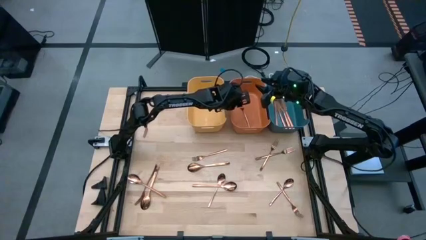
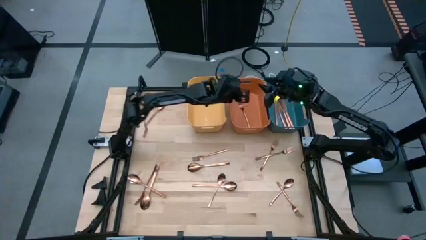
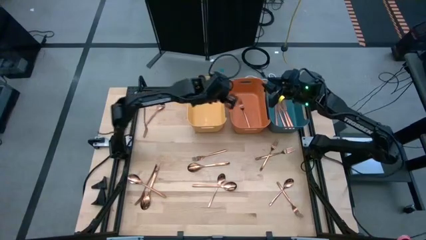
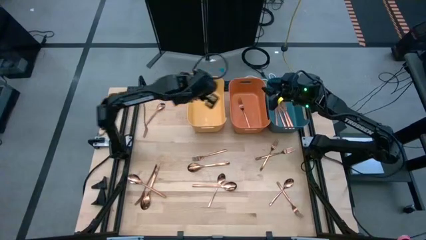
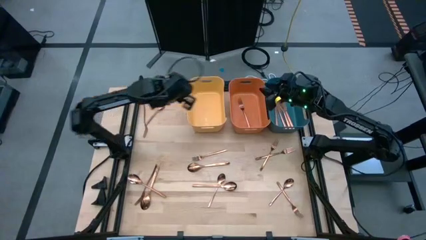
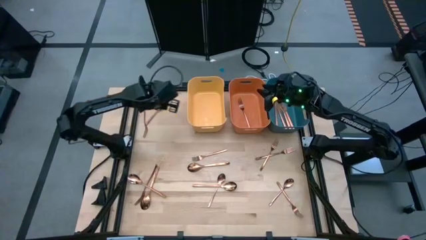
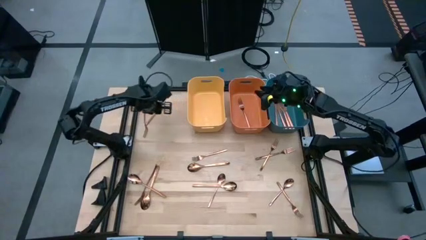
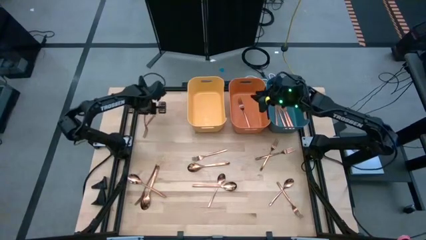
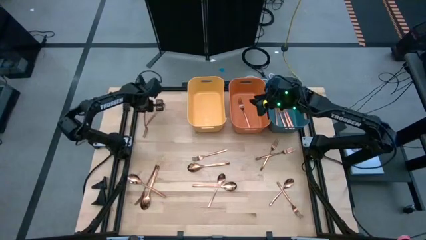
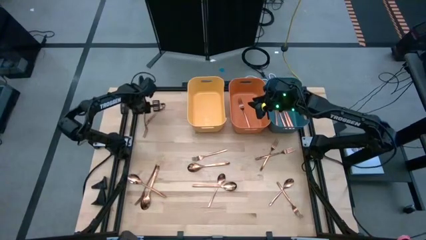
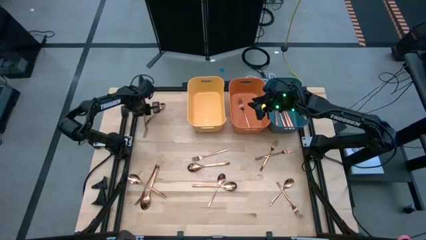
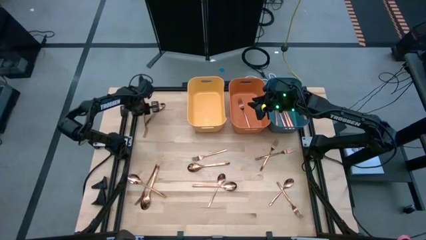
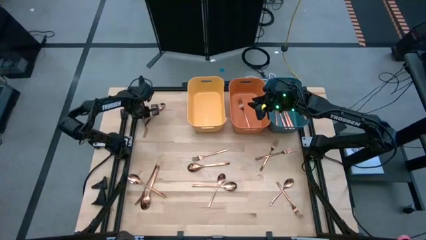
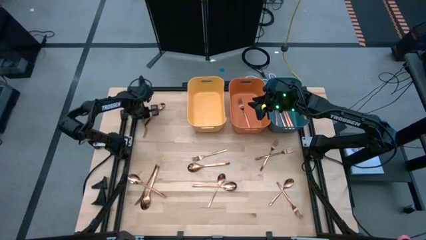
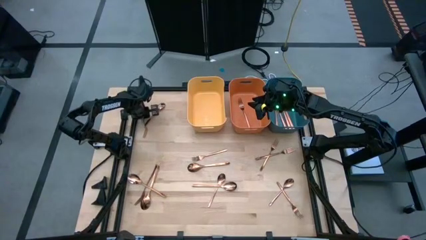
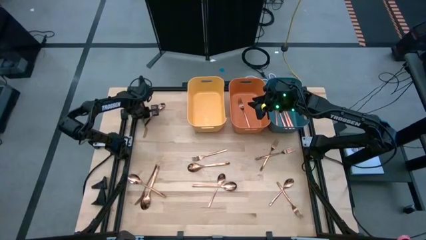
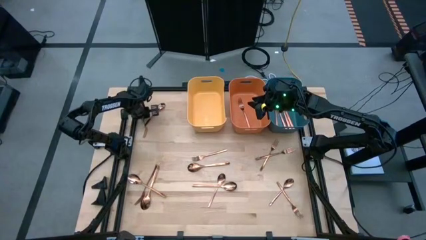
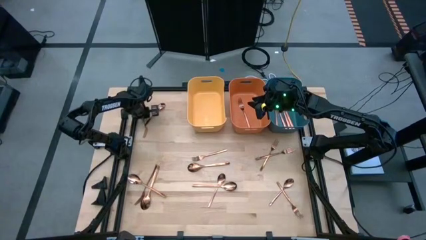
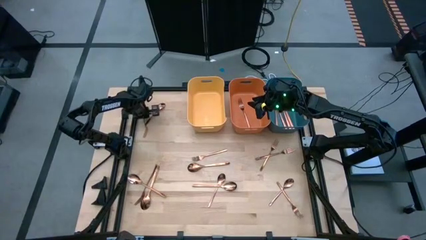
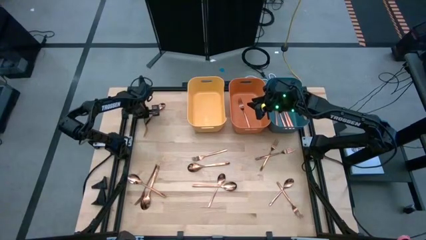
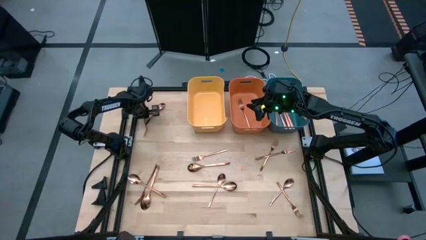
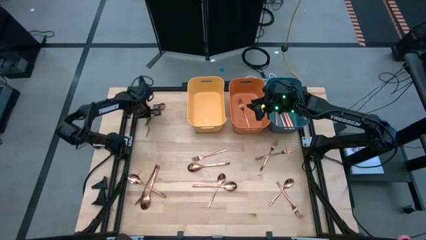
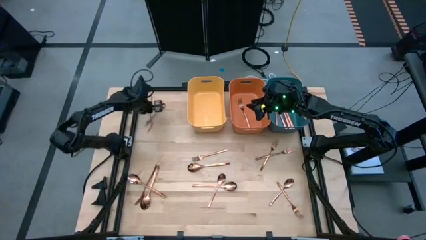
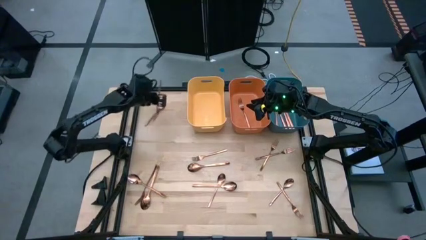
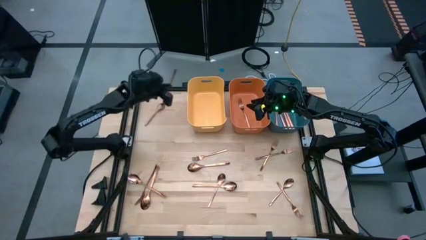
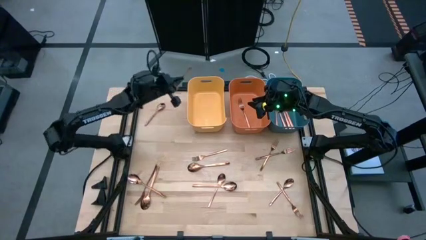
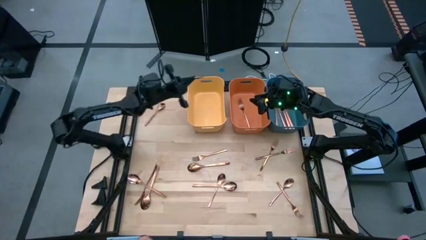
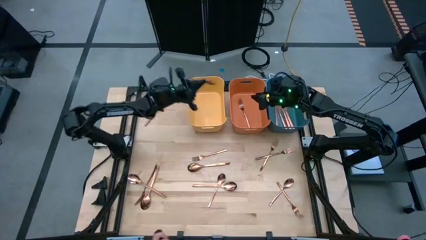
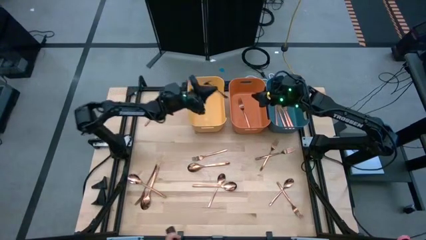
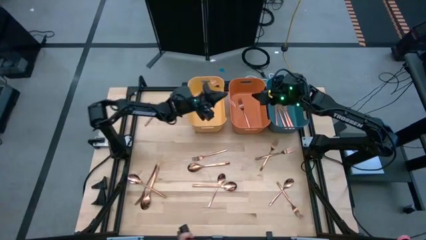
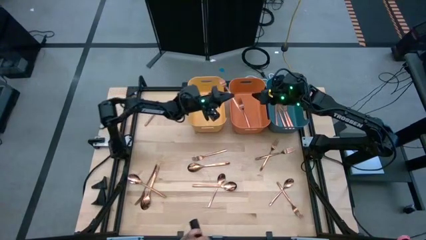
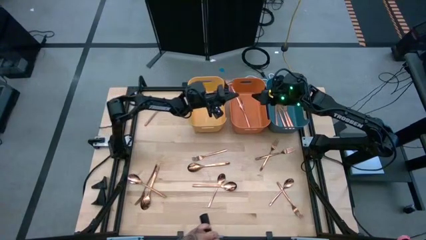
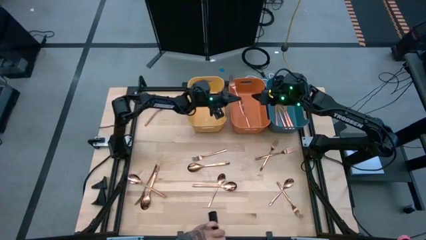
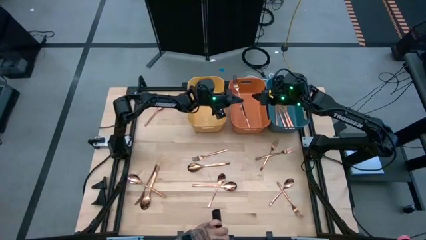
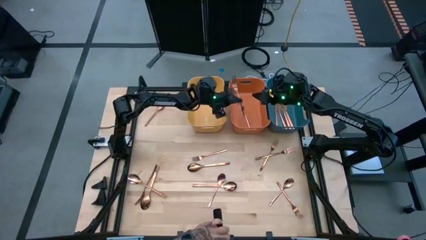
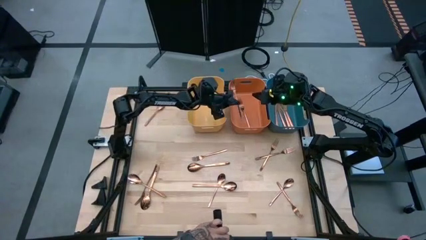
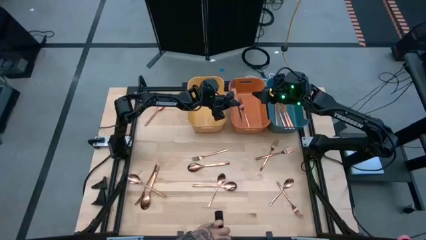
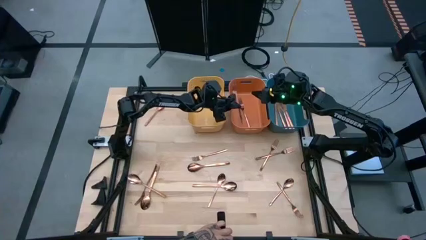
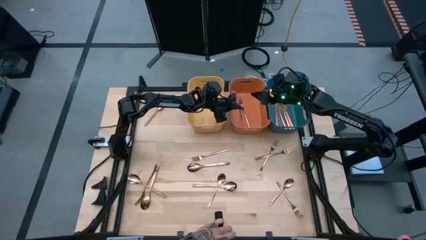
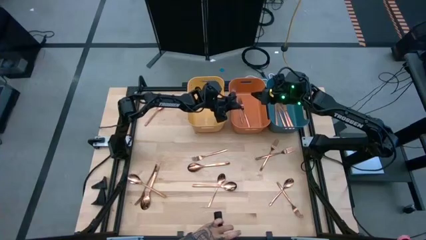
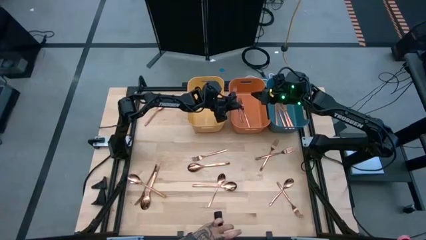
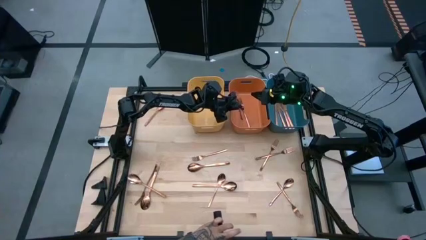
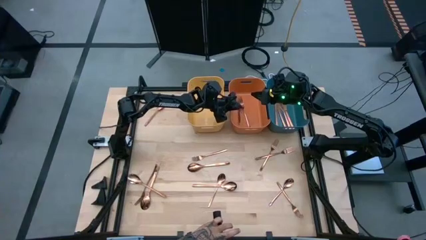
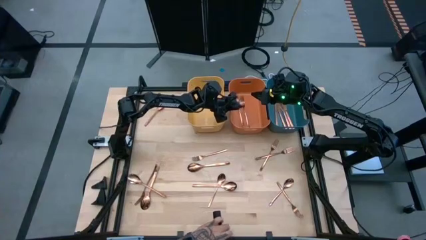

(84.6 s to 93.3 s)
Task: Sort silverware
Put the copper fork into the orange bin

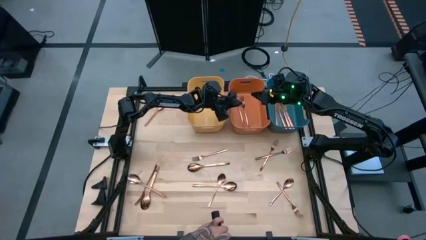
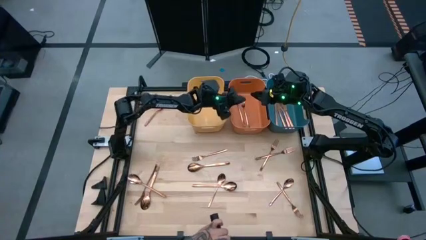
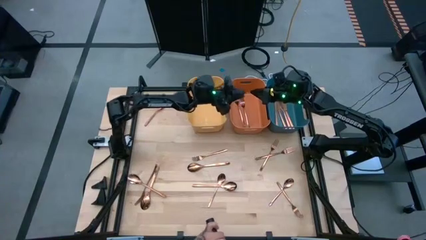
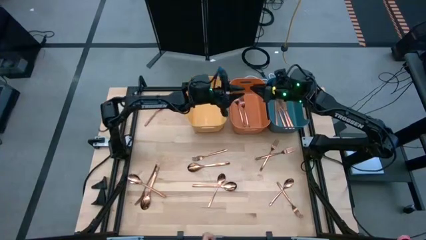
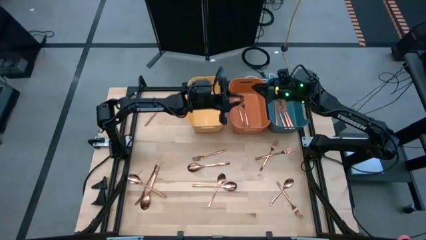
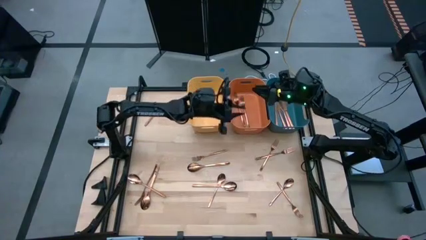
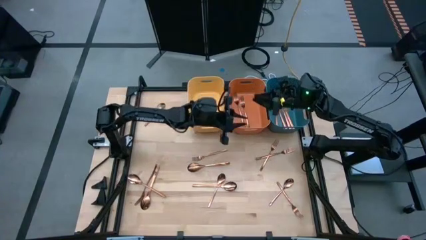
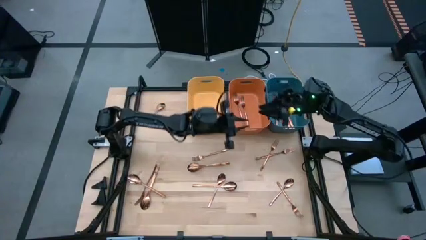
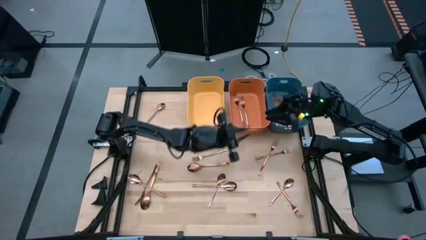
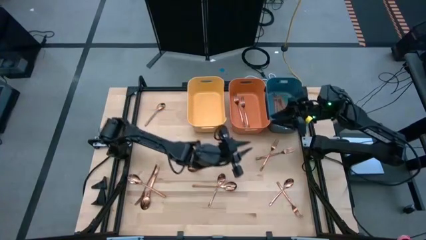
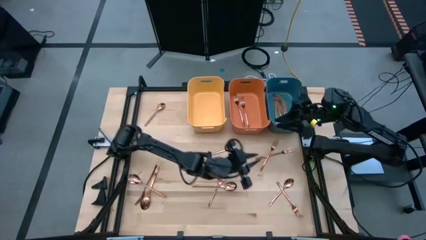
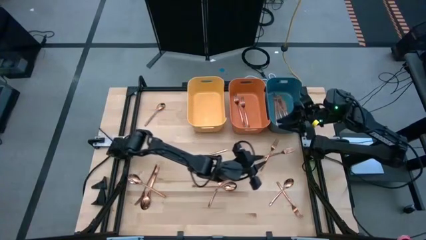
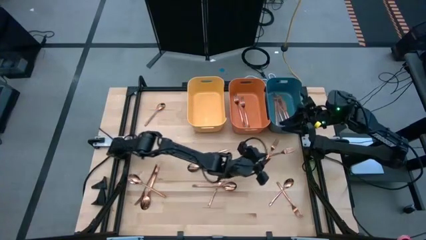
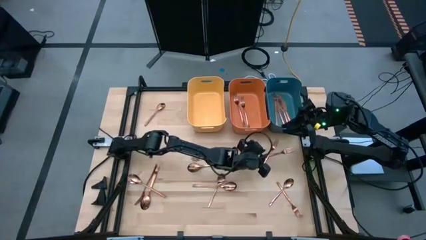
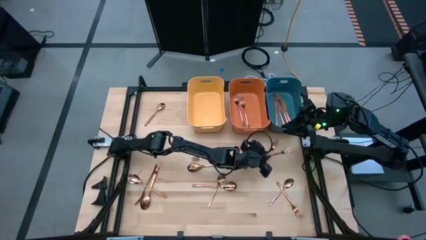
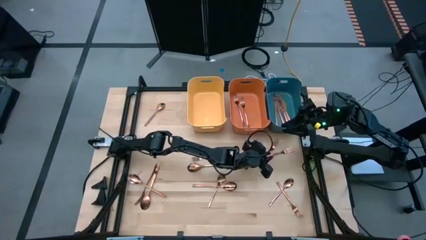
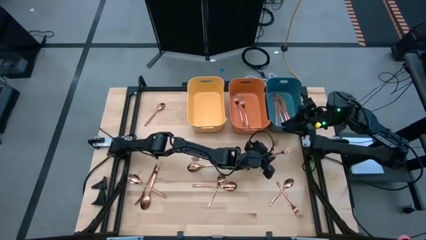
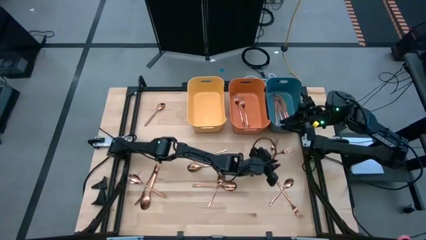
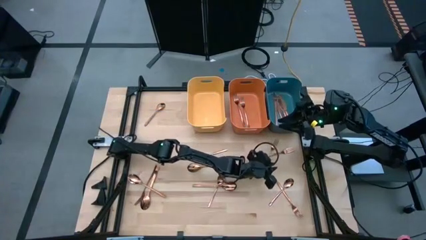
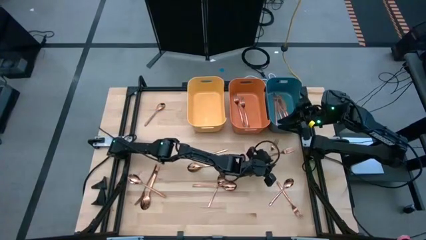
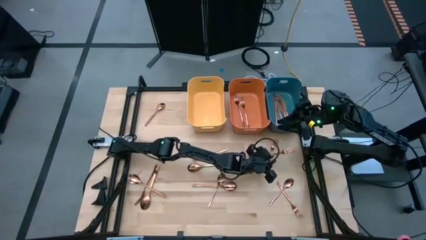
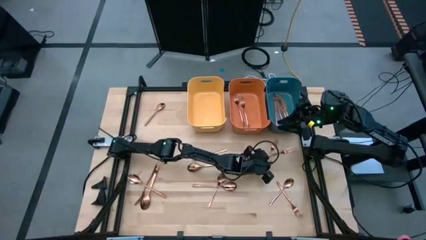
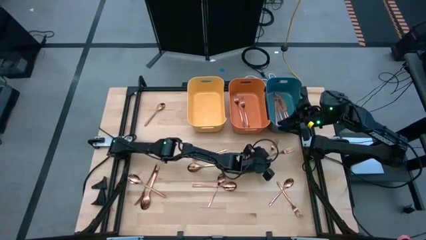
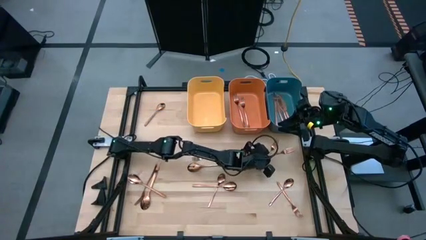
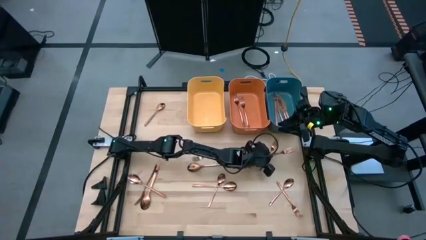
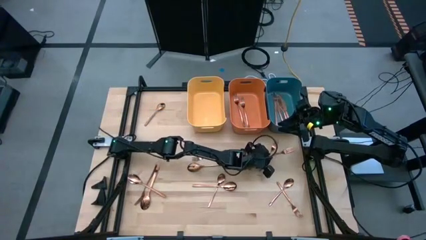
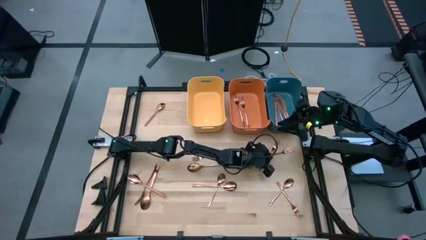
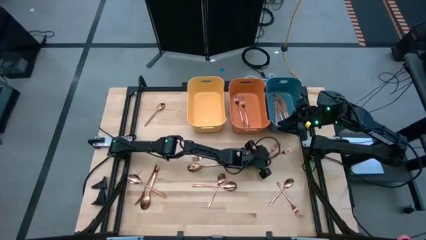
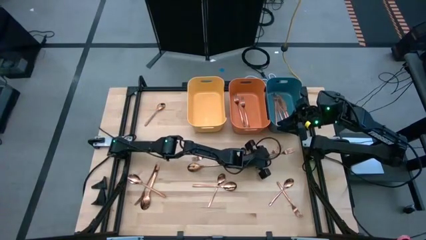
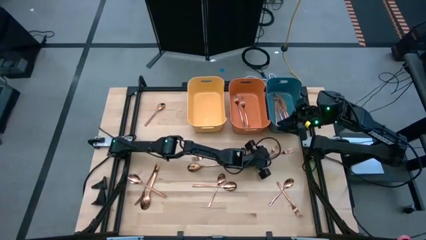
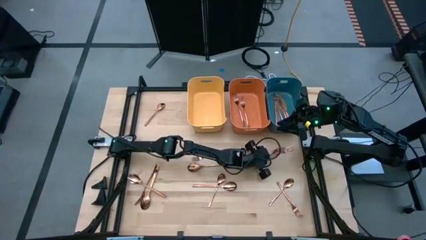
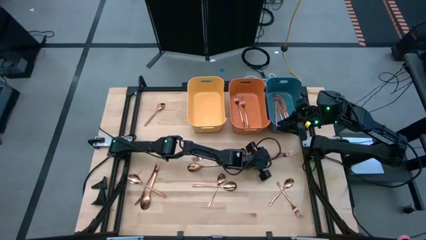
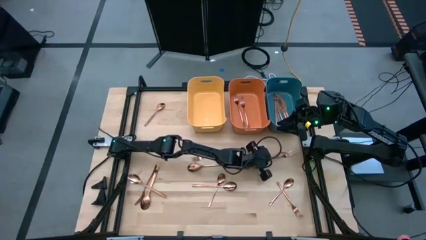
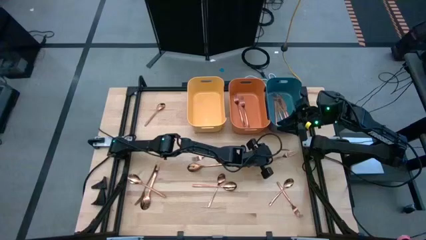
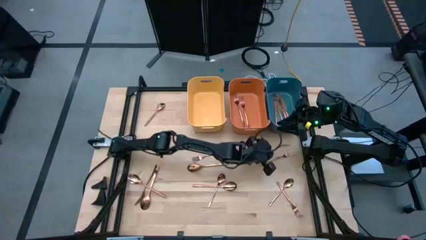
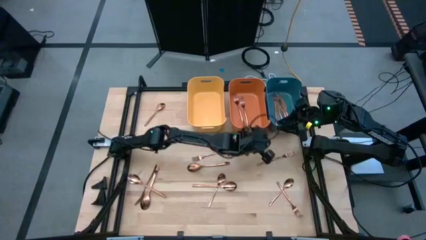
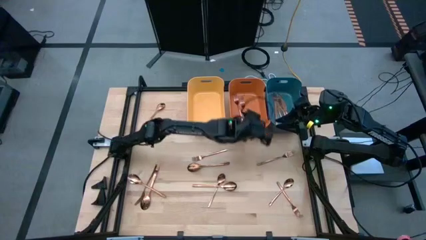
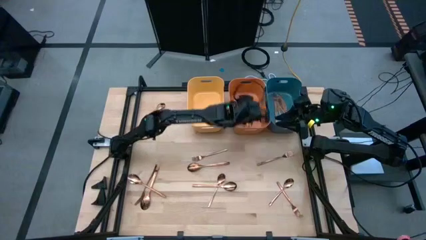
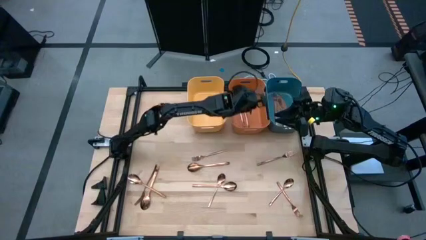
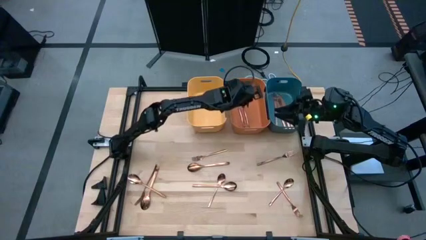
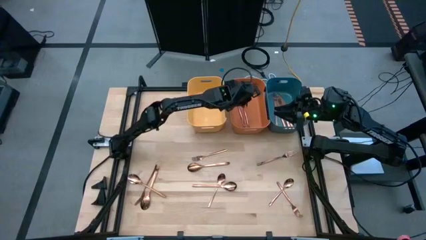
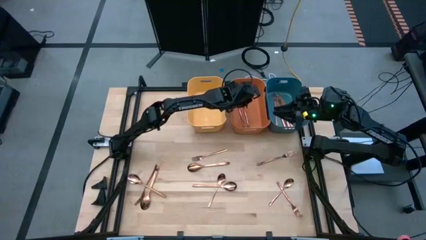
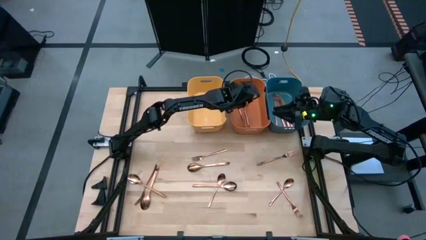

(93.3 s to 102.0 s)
Put the copper fork into the orange bin
